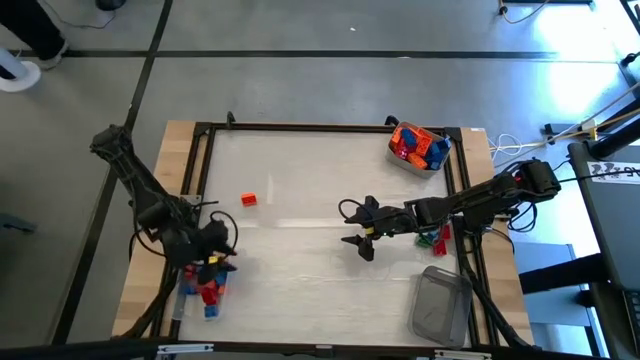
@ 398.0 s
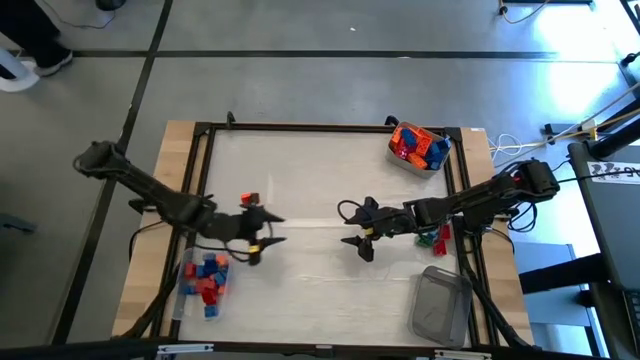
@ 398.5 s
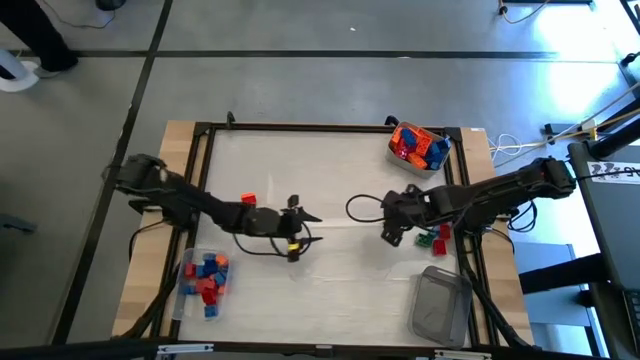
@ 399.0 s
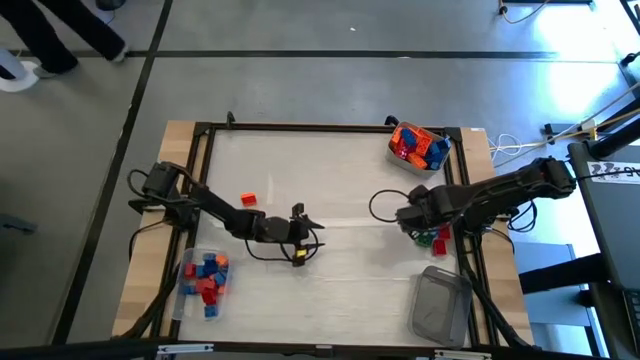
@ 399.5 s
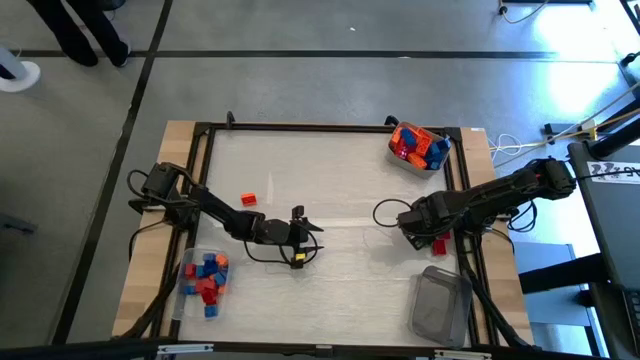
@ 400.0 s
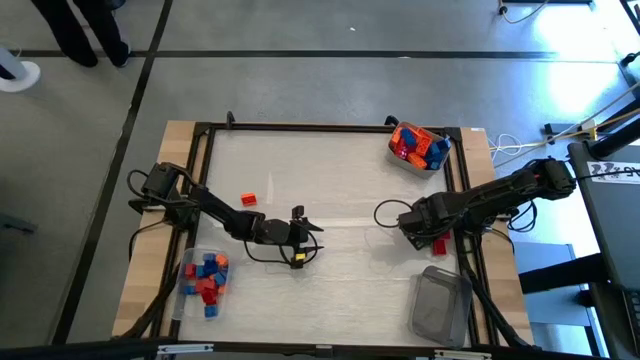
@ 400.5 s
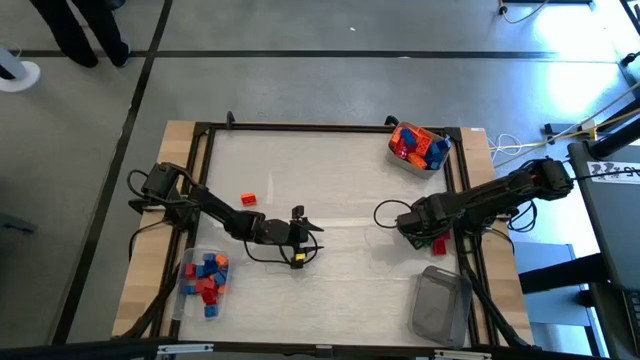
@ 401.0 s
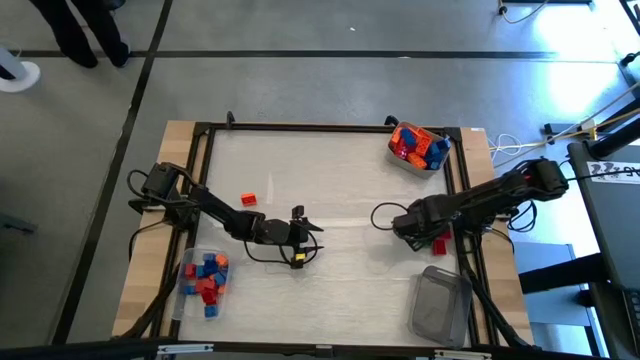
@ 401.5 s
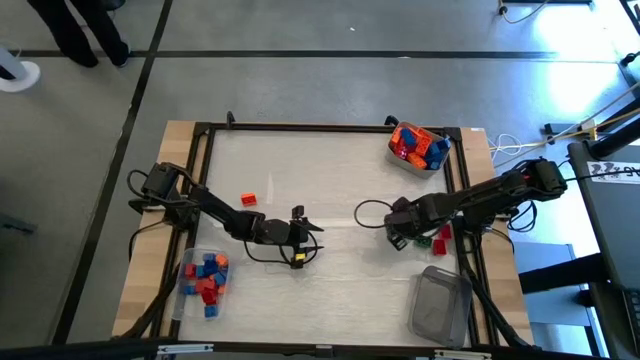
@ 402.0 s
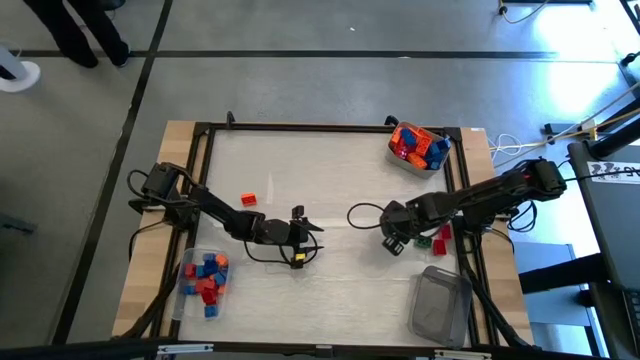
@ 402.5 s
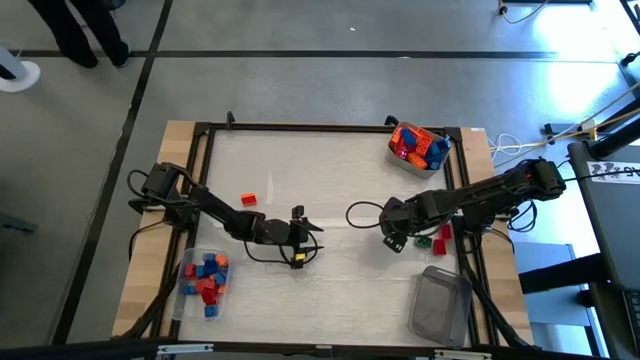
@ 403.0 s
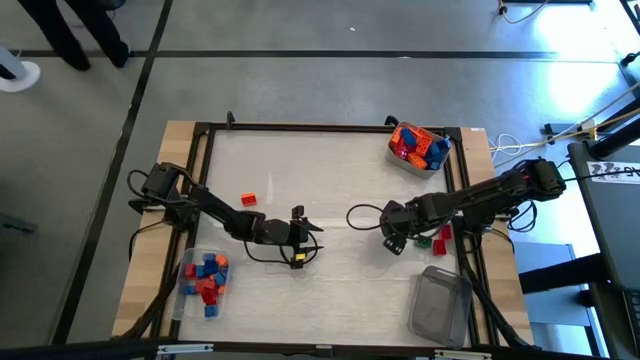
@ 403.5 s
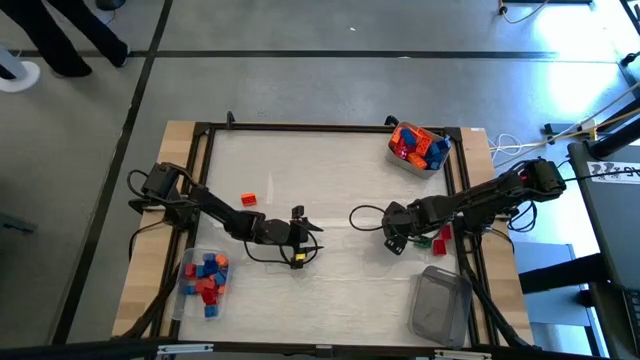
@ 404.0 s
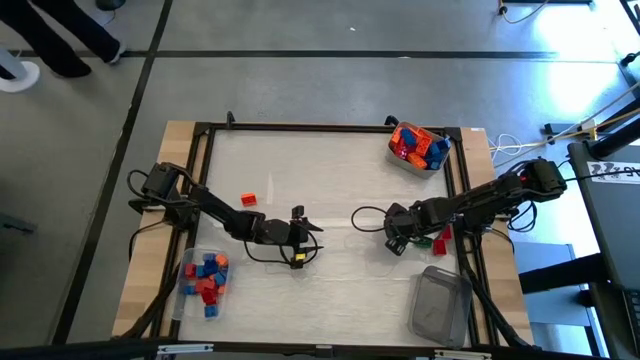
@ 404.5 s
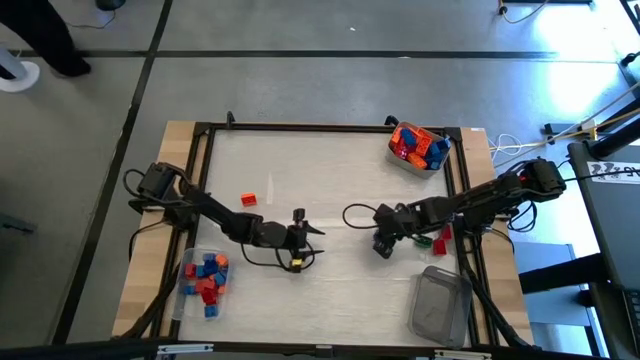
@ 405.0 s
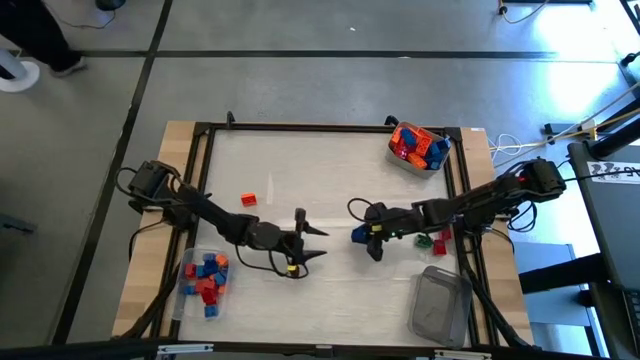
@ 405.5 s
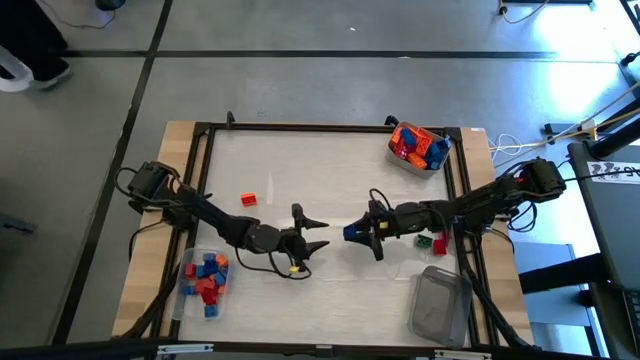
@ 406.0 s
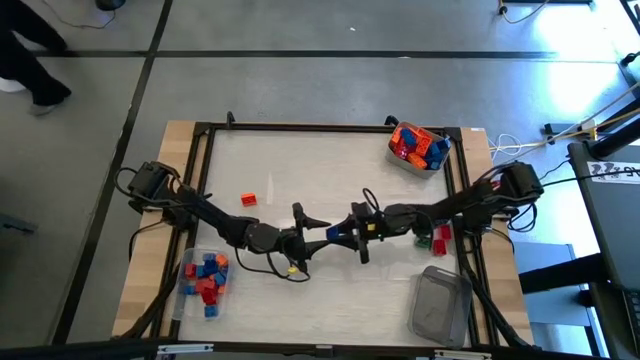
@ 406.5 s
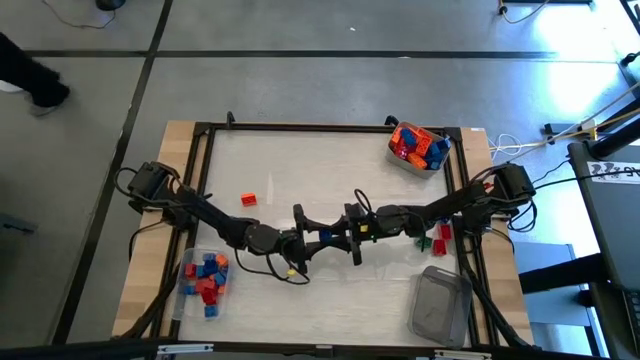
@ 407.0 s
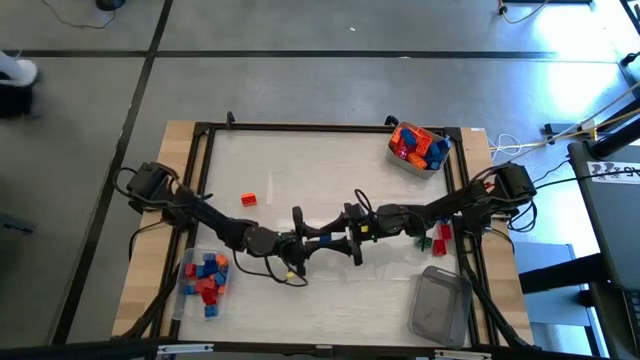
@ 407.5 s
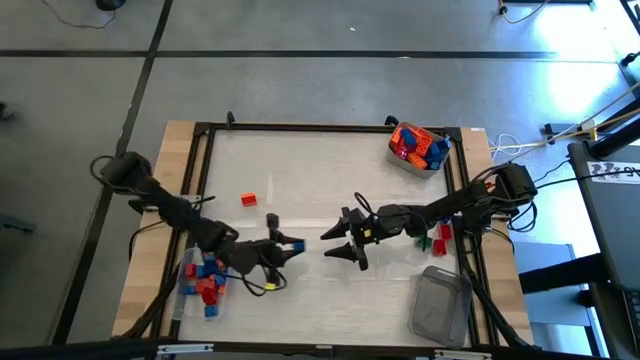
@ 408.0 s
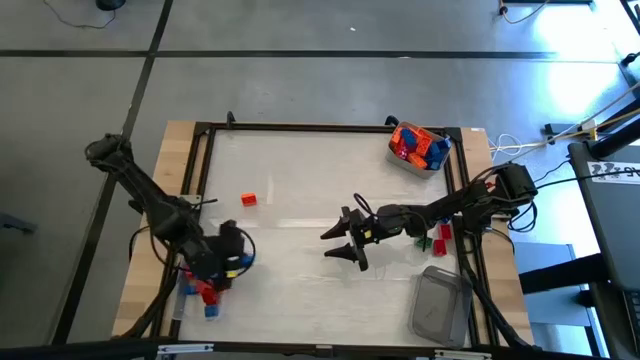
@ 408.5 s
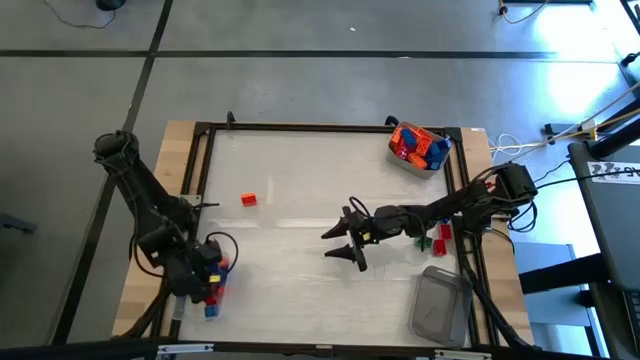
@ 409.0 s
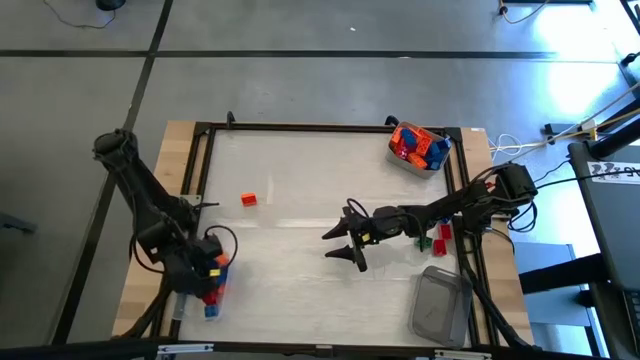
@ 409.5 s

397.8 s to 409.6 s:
Task: Sort blocks by size
Put the blue game piece into the transparent bin

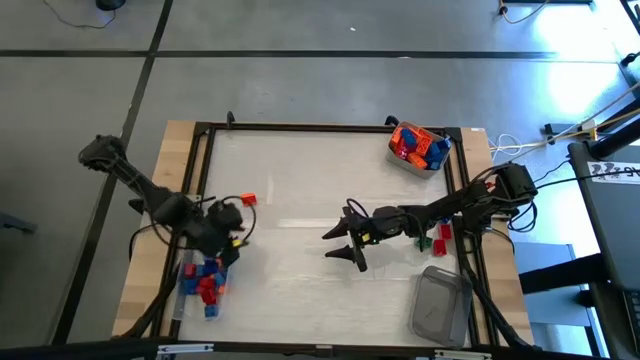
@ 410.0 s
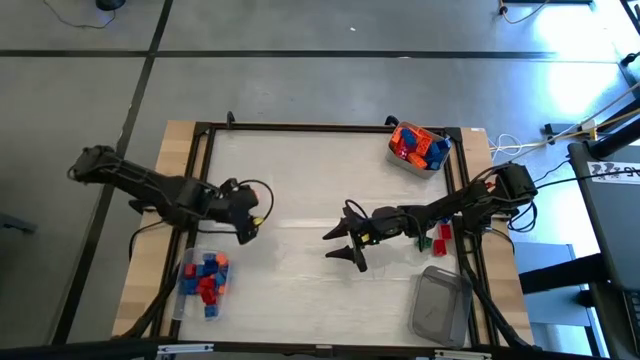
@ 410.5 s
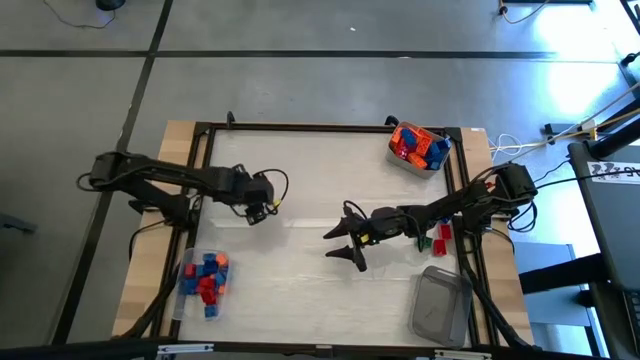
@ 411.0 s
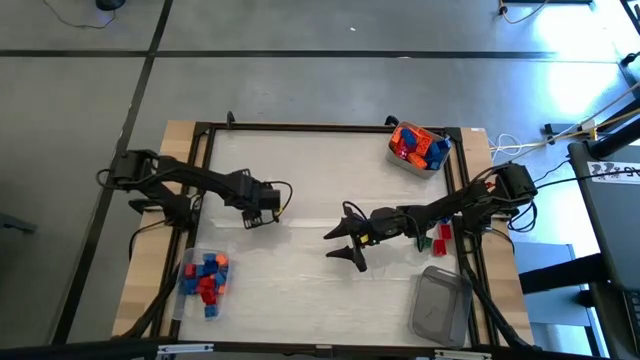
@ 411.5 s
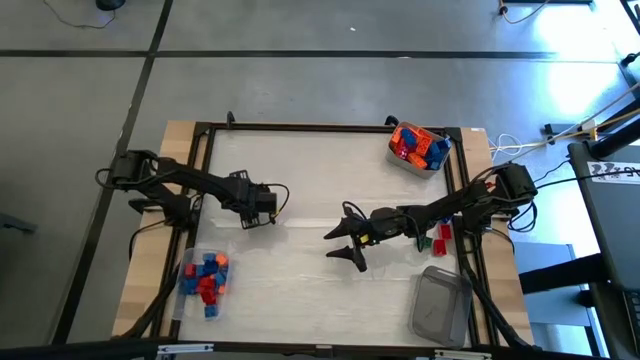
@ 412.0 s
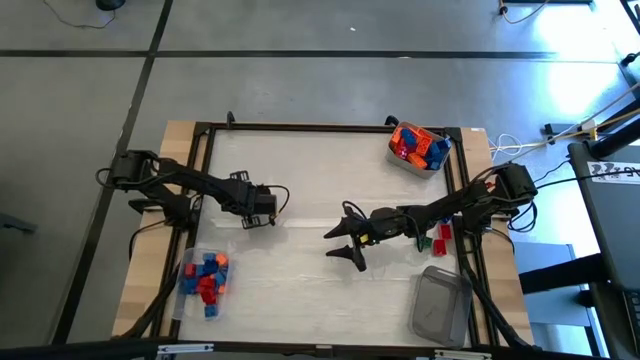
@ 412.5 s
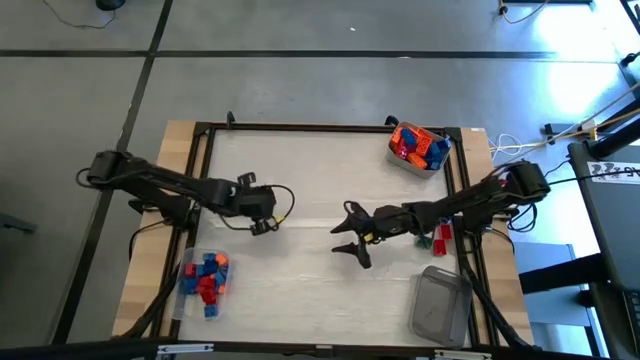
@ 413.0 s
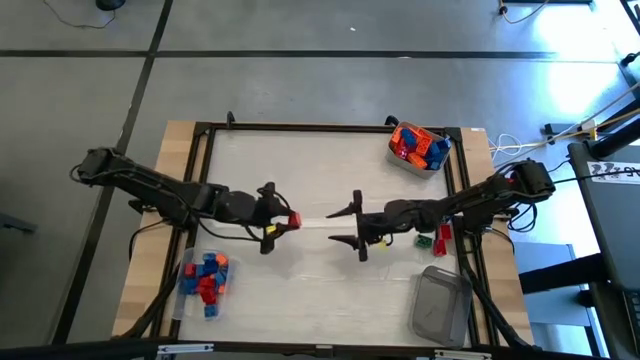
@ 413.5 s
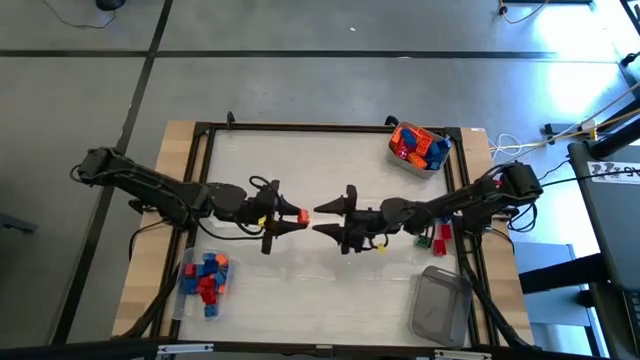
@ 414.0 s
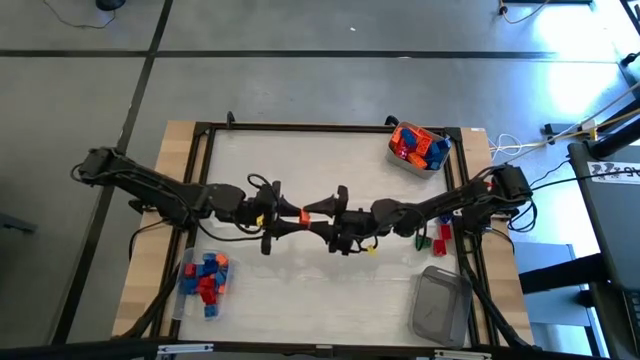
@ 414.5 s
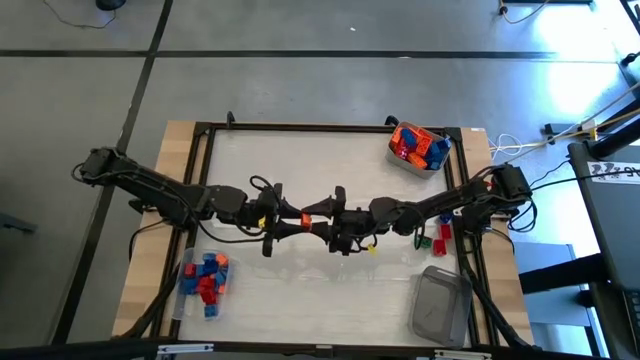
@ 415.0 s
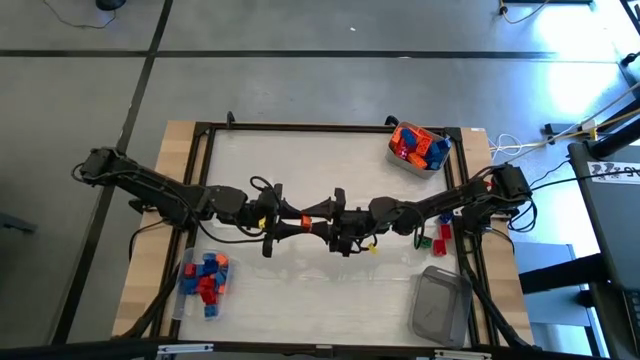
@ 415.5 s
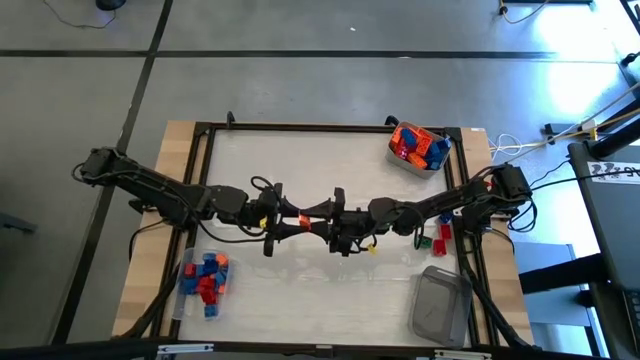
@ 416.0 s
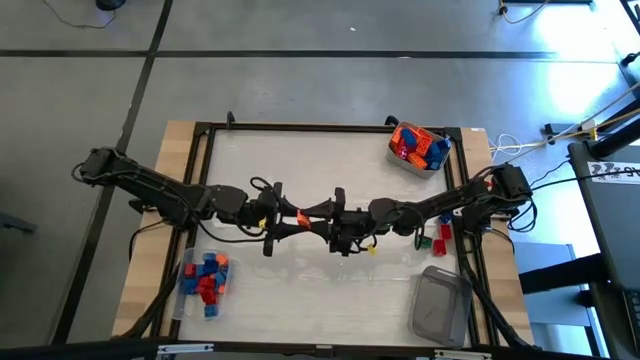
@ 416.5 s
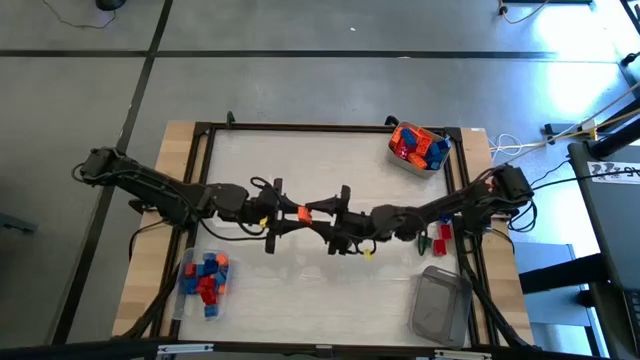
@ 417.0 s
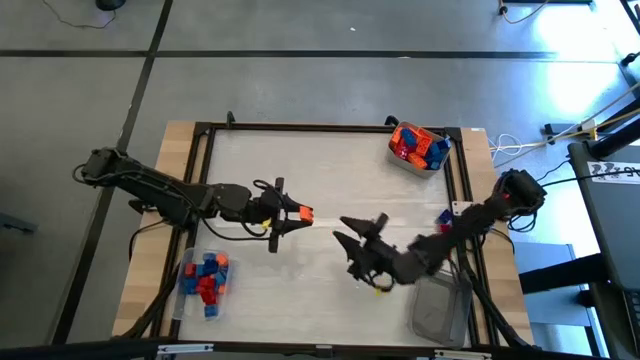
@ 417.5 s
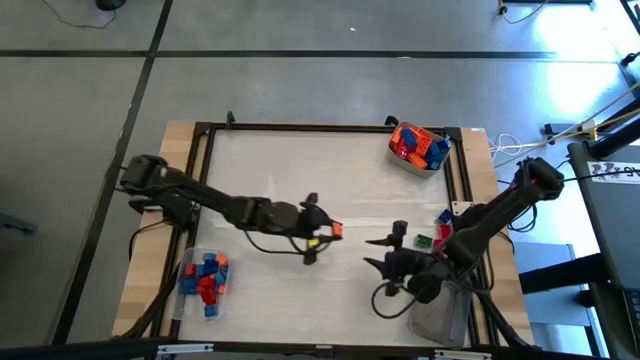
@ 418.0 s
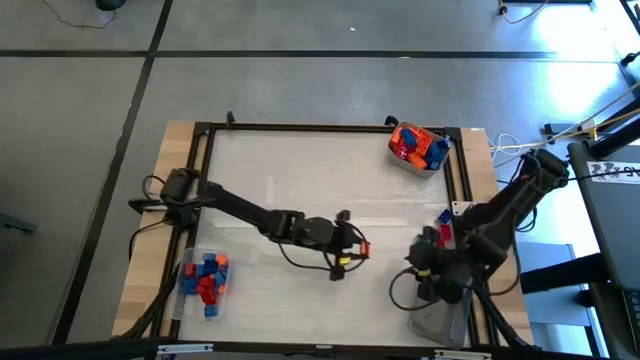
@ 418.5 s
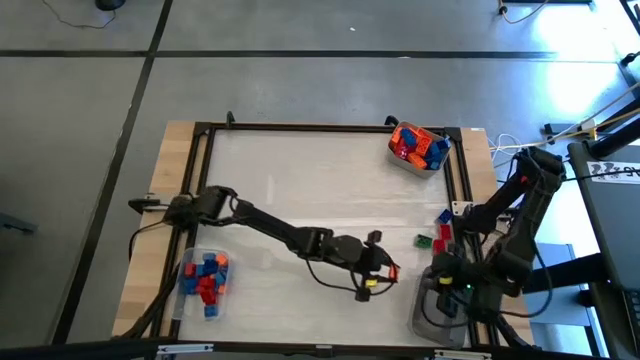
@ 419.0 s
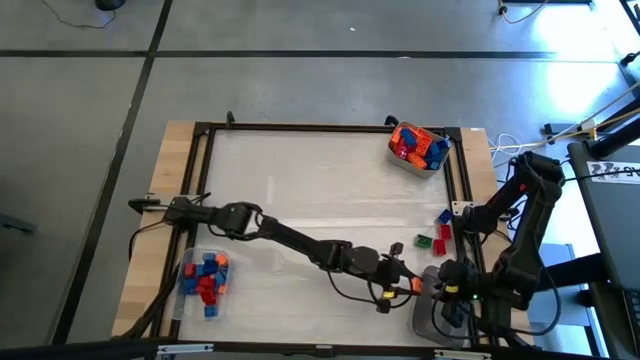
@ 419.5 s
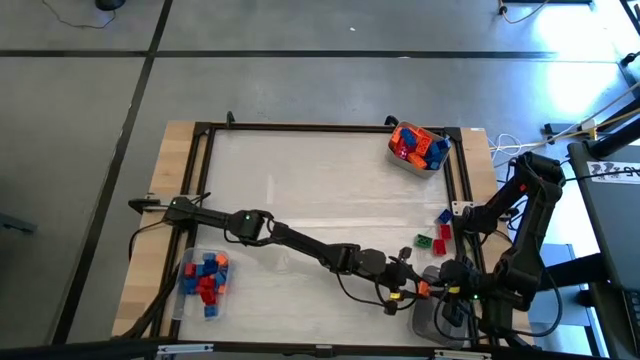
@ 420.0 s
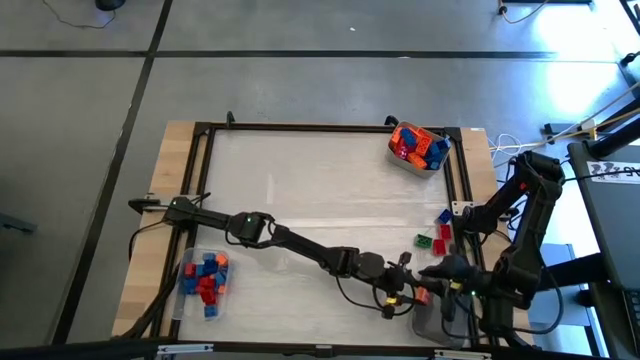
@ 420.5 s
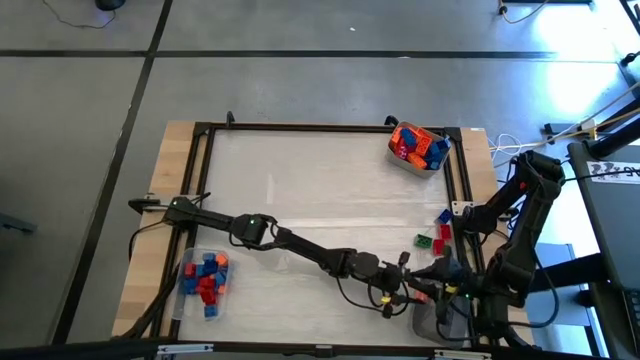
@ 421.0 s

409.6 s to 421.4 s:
Put the orange game piece into the black bin
